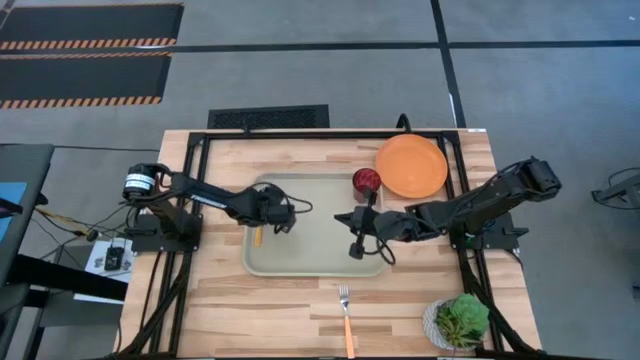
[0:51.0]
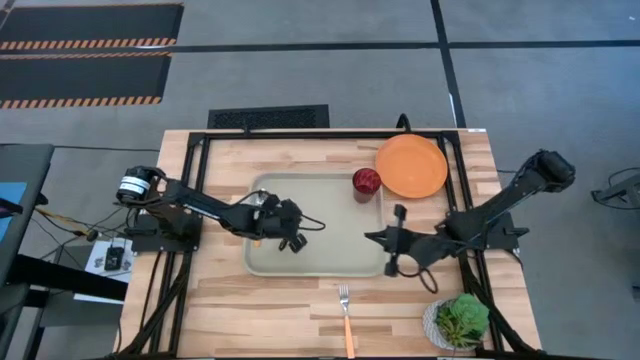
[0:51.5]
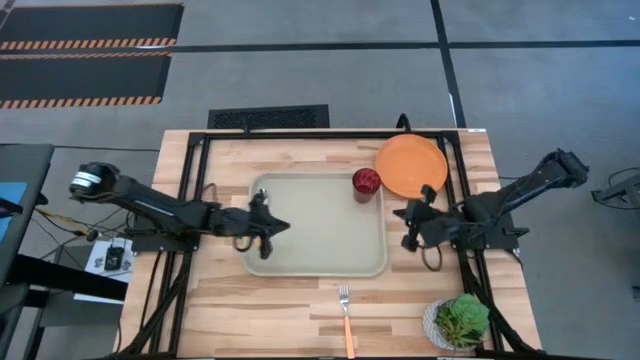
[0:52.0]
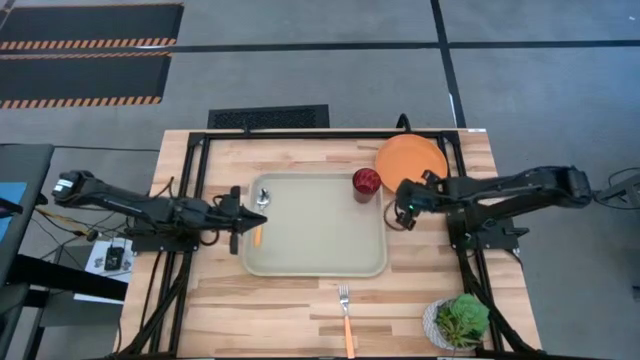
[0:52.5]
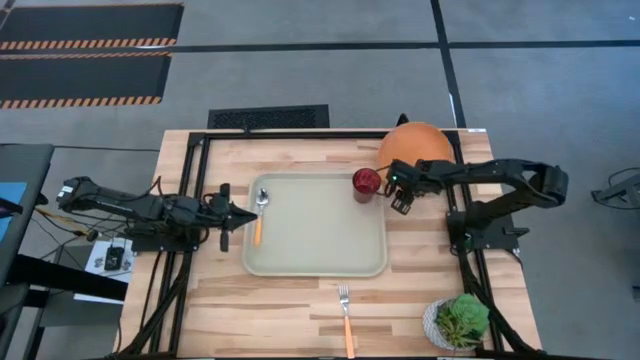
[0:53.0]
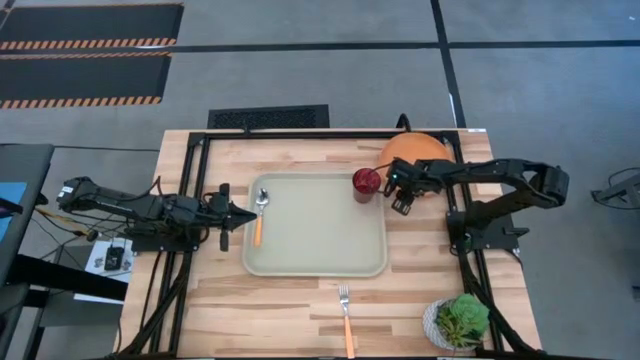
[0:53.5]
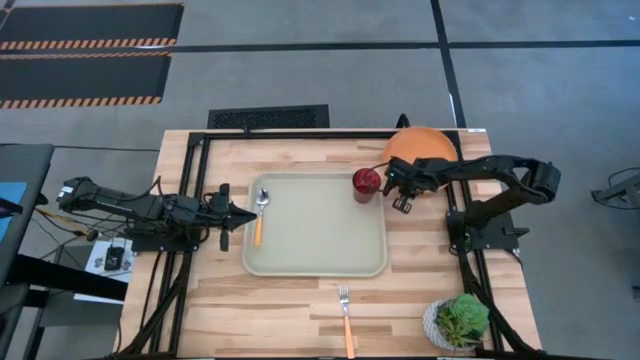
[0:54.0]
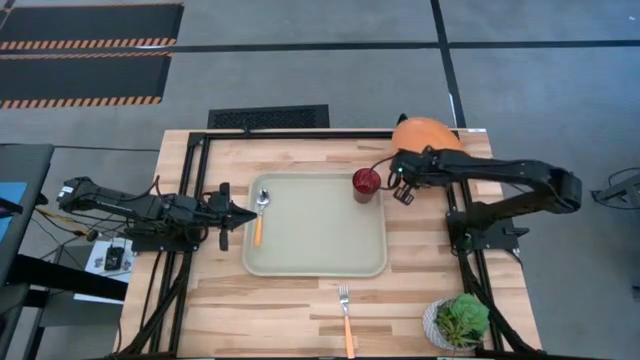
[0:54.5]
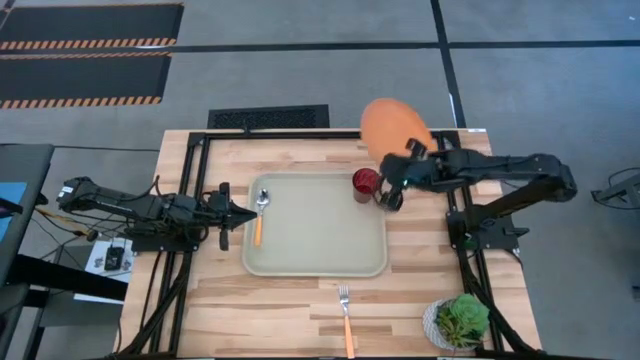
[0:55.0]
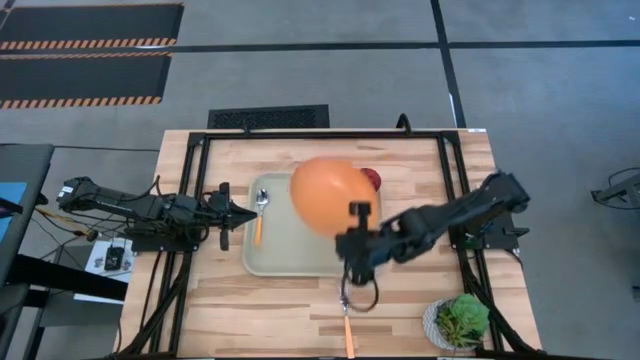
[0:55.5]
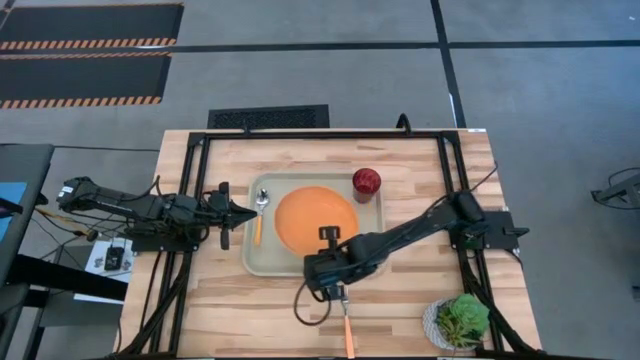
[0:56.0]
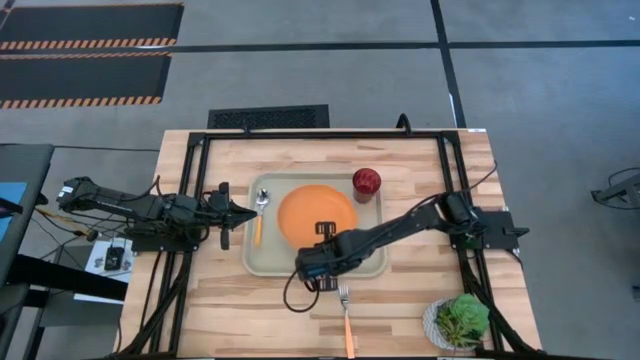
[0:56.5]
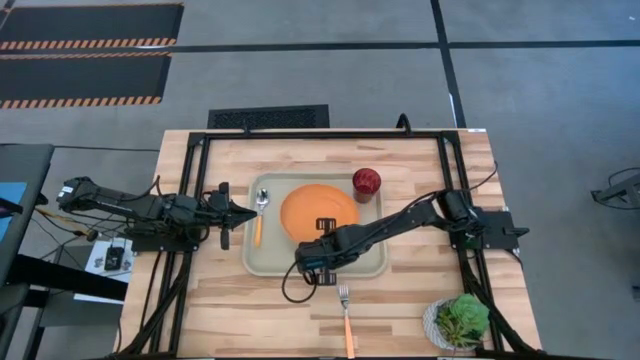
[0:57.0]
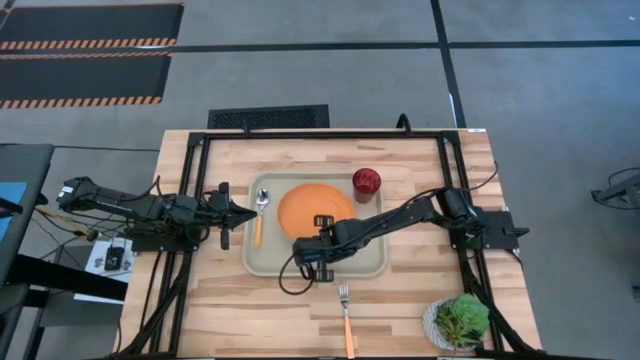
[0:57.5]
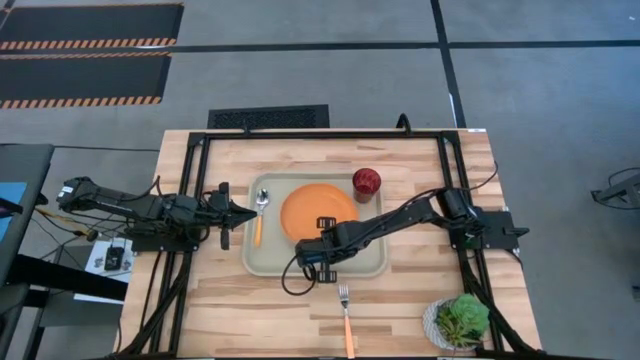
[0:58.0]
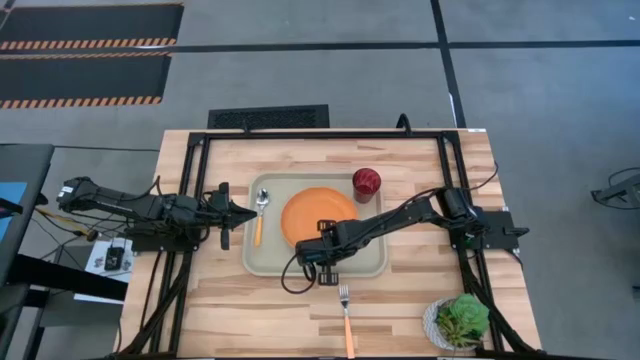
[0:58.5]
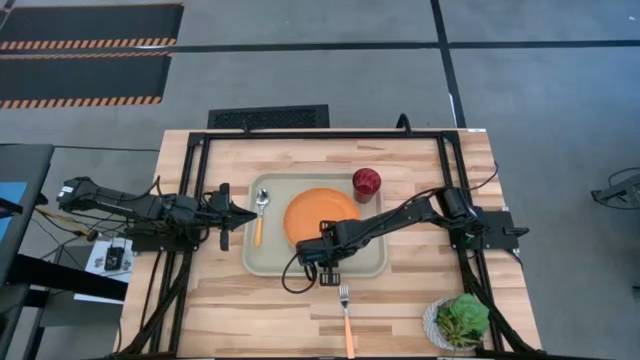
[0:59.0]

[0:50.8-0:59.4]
Task: Pick and place plate/cup/fork/spoon on tray
Put the orange plate on the gray serving tray to the right of the orange spoon

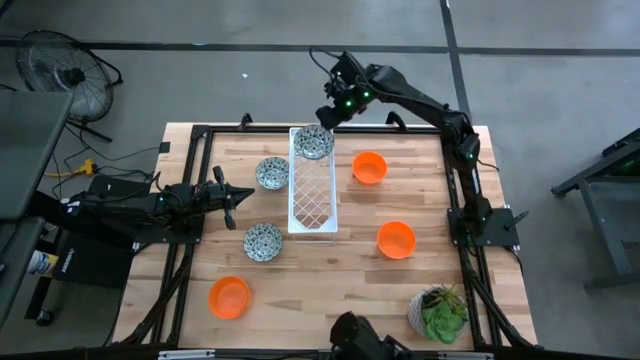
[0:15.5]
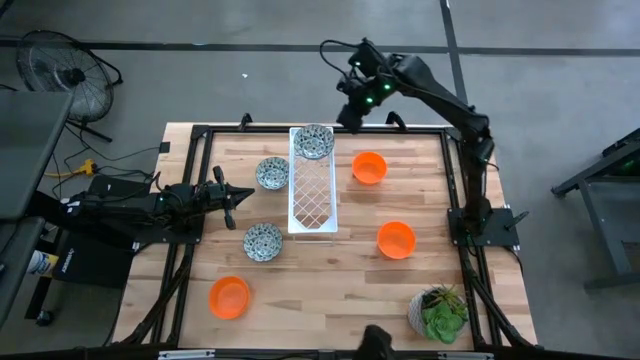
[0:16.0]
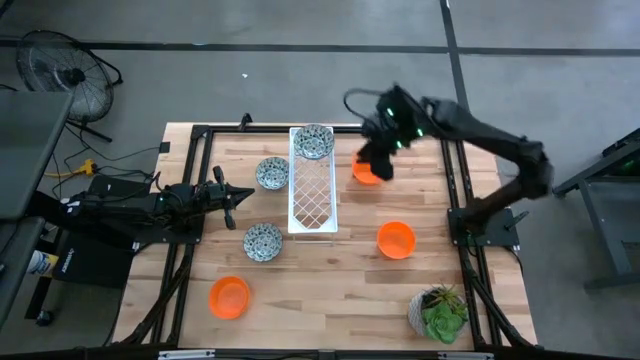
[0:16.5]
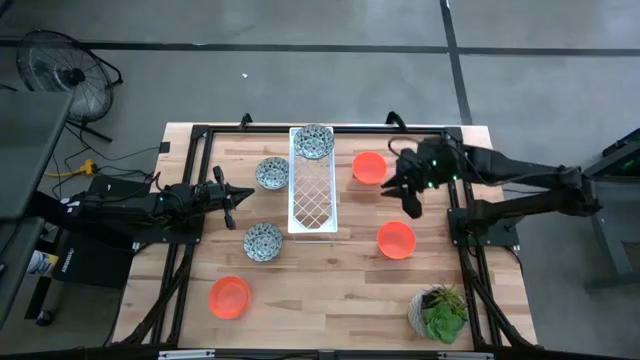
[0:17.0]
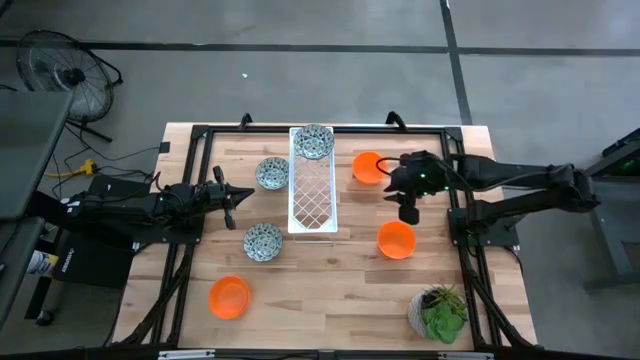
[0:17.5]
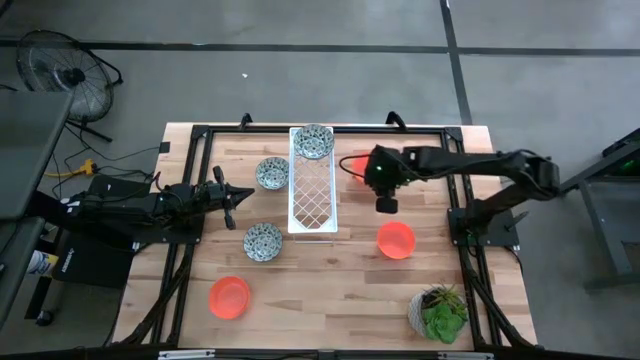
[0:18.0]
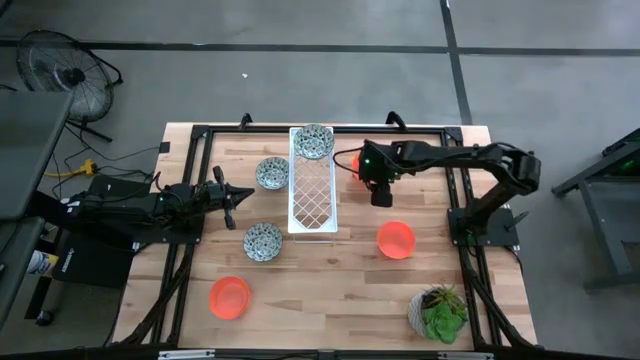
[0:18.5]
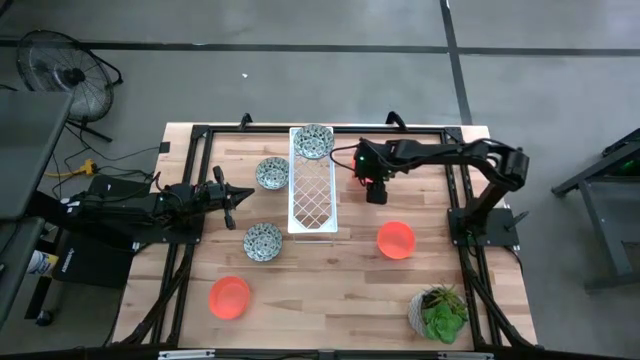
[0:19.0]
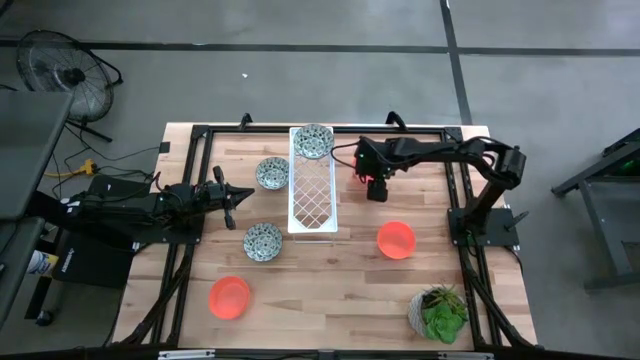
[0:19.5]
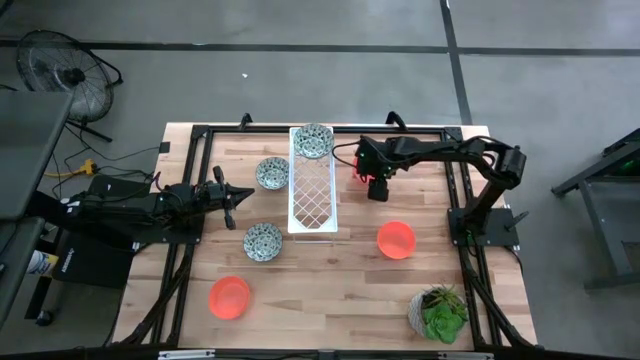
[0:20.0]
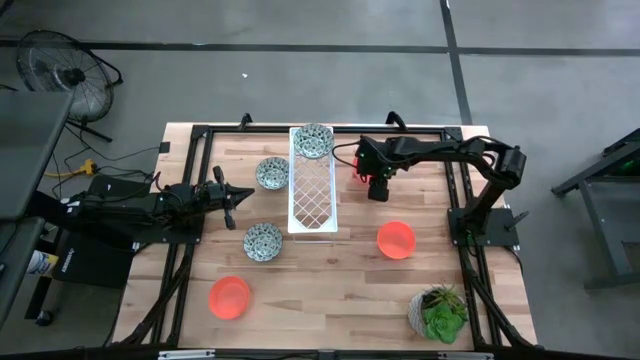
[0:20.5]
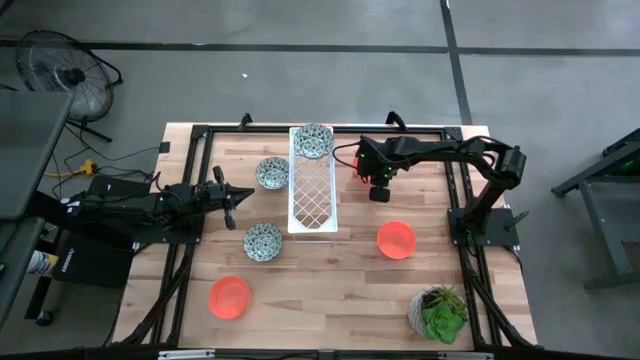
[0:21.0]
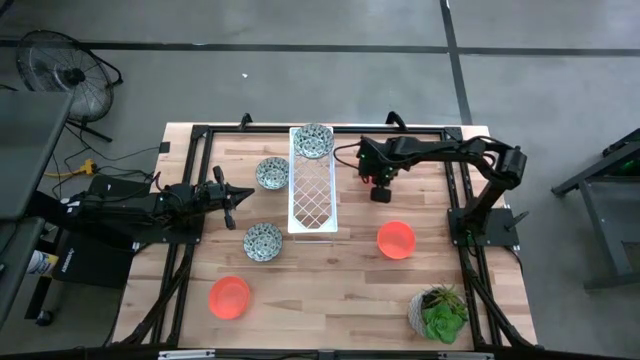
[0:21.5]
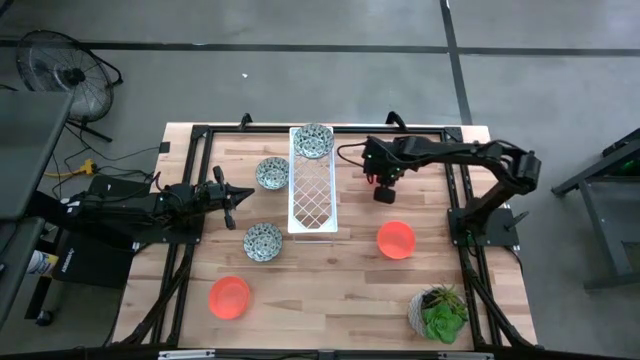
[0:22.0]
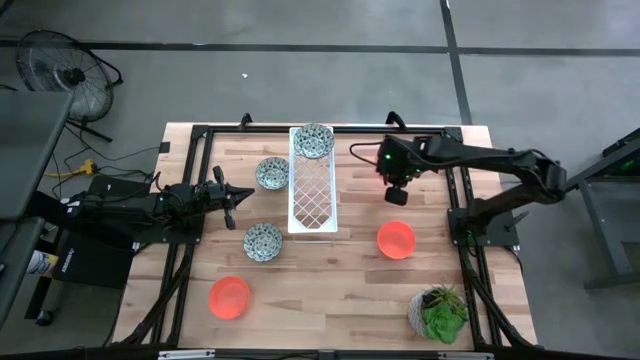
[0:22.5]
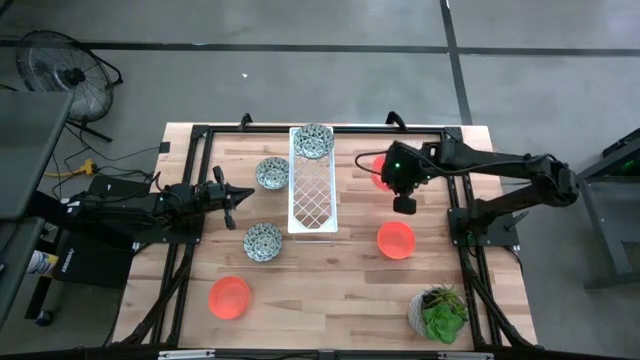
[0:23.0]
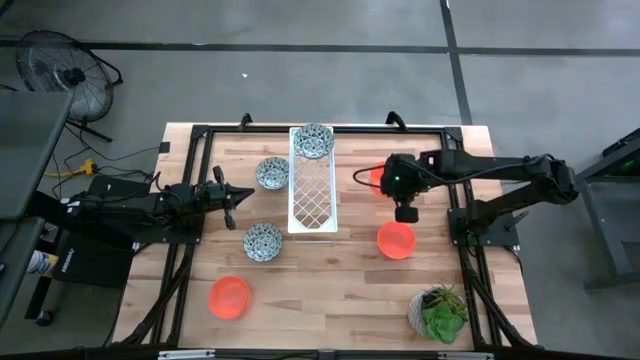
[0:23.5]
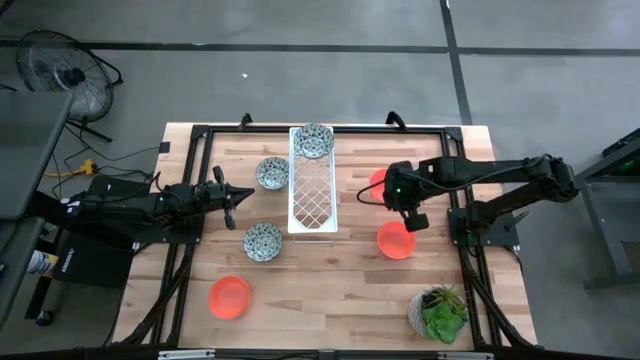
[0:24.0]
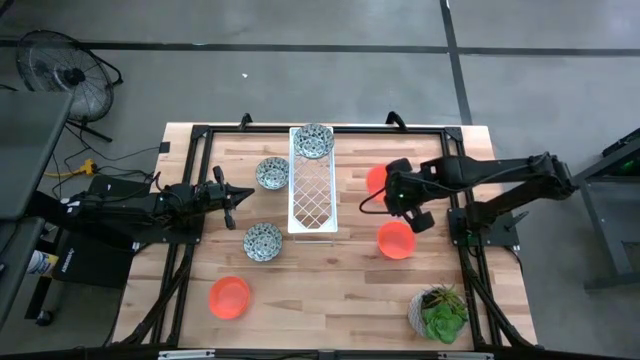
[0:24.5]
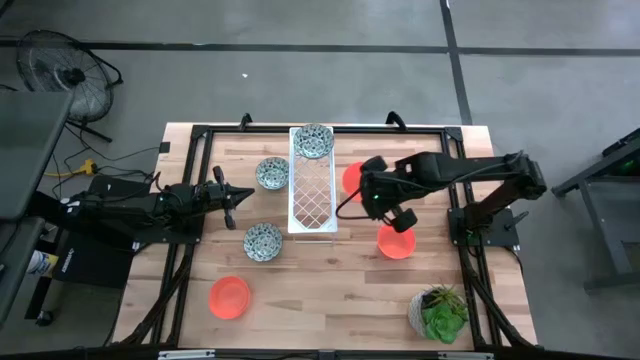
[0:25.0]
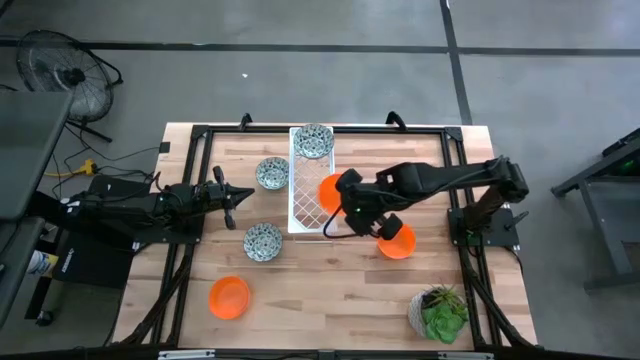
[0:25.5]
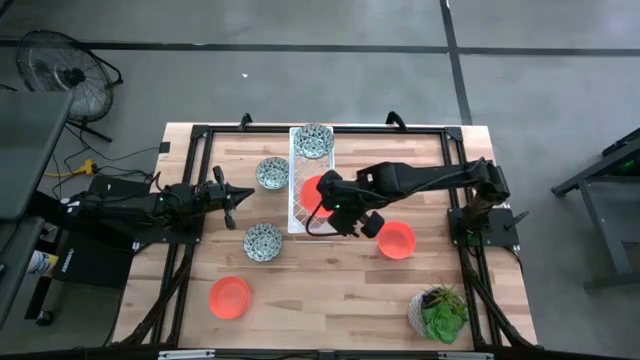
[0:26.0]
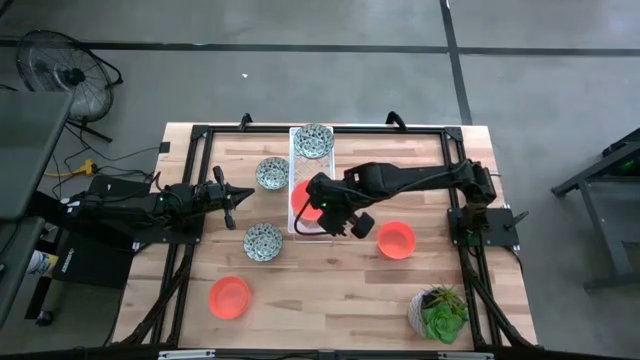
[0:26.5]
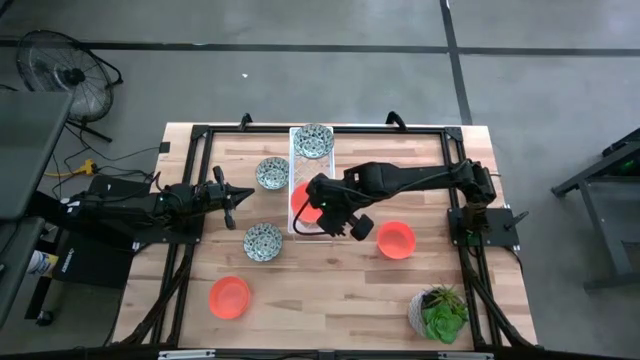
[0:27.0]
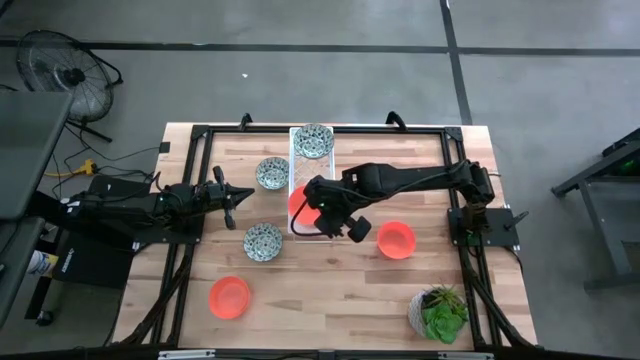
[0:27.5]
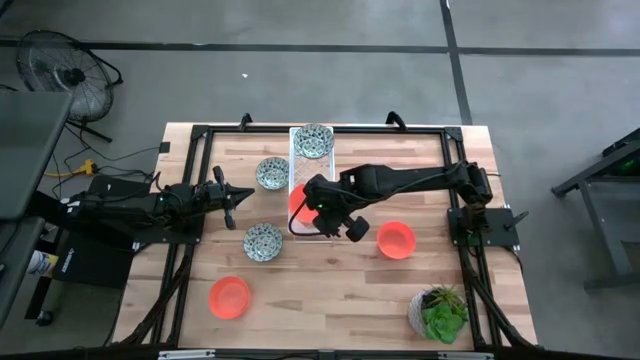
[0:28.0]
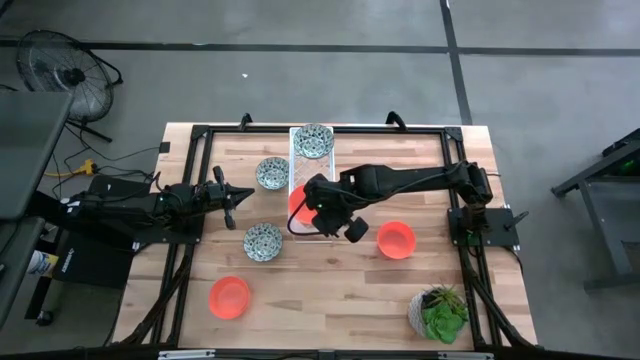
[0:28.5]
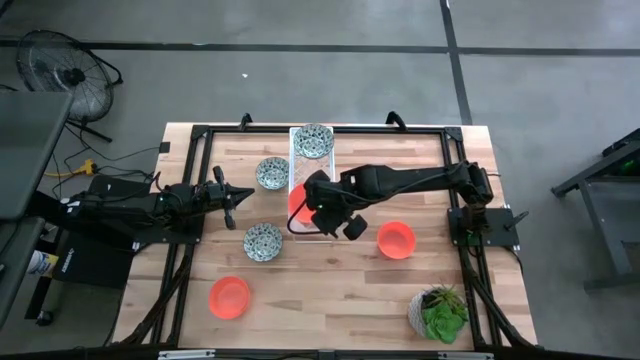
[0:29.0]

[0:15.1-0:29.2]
Task: Pick & Place Mini bowls
Put the top right orange bowl on the shelf
